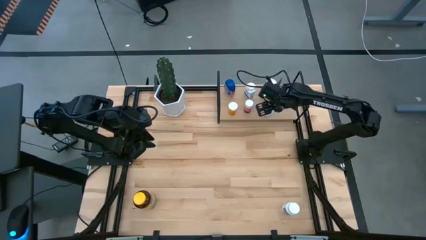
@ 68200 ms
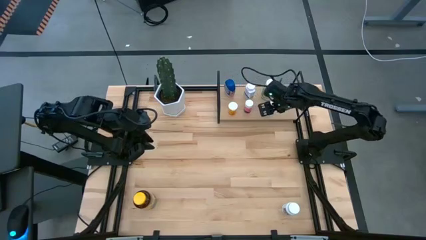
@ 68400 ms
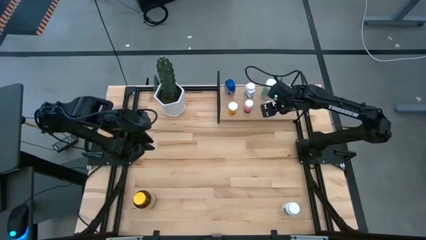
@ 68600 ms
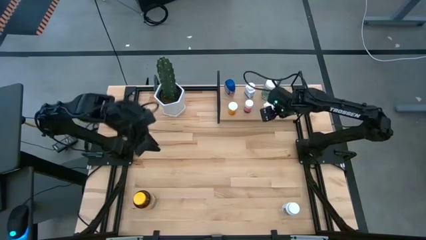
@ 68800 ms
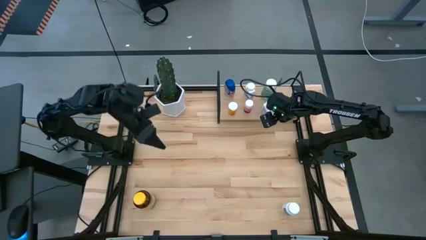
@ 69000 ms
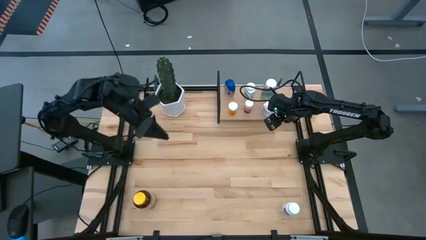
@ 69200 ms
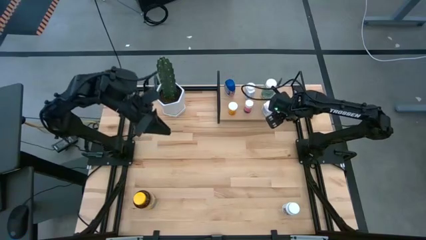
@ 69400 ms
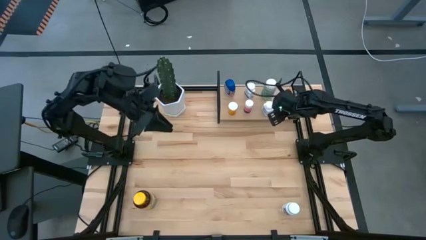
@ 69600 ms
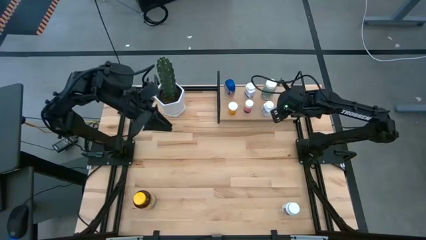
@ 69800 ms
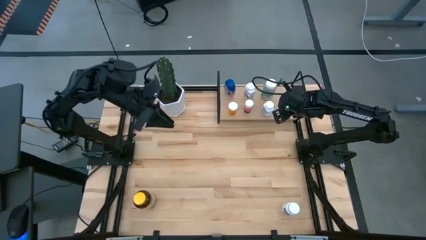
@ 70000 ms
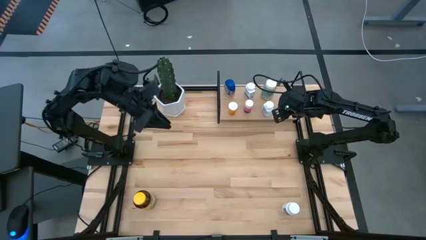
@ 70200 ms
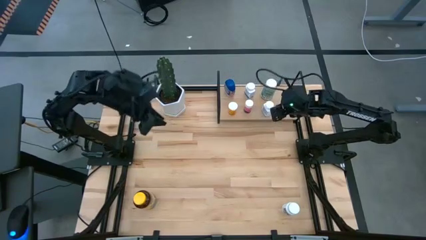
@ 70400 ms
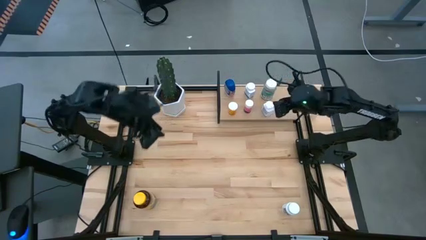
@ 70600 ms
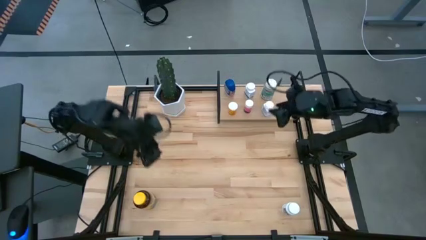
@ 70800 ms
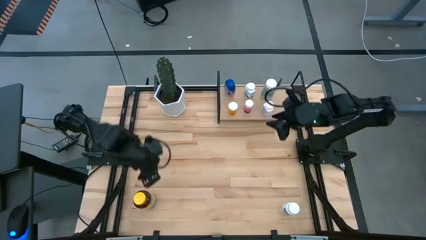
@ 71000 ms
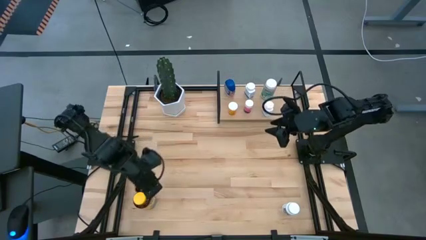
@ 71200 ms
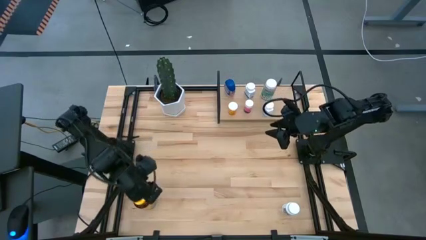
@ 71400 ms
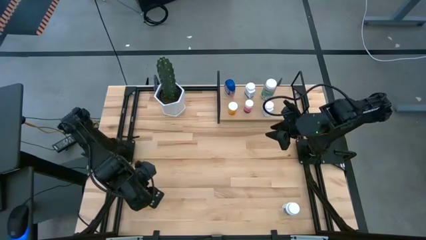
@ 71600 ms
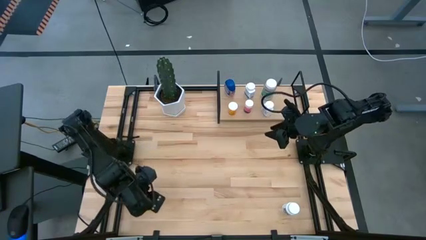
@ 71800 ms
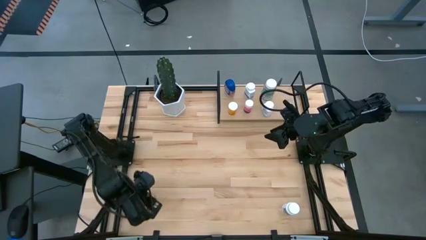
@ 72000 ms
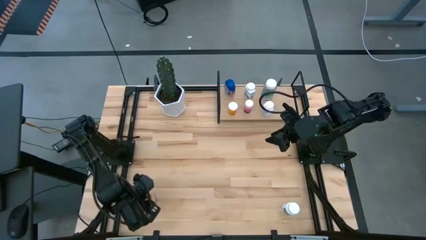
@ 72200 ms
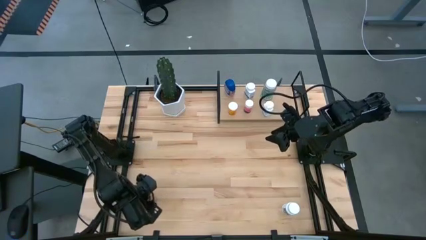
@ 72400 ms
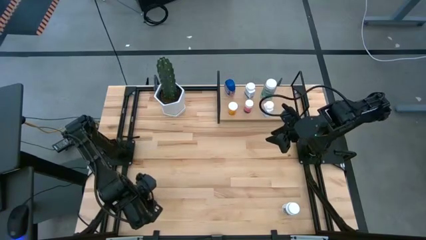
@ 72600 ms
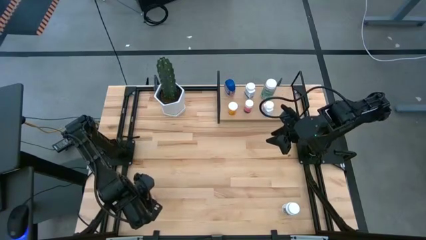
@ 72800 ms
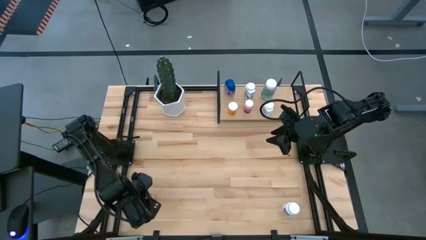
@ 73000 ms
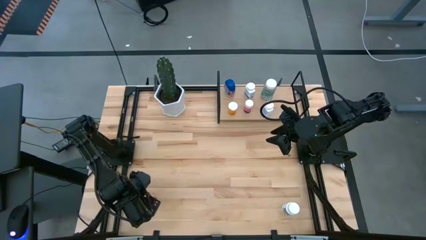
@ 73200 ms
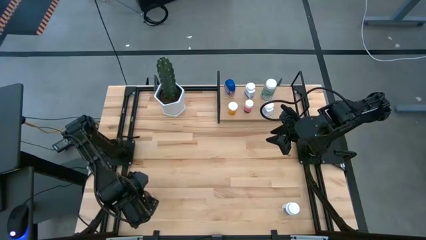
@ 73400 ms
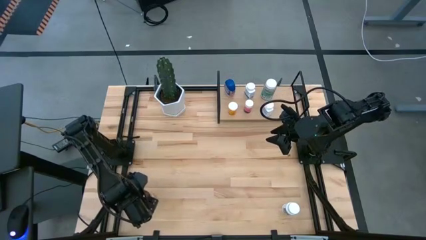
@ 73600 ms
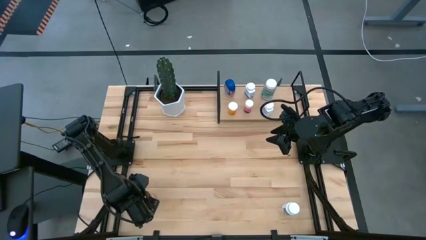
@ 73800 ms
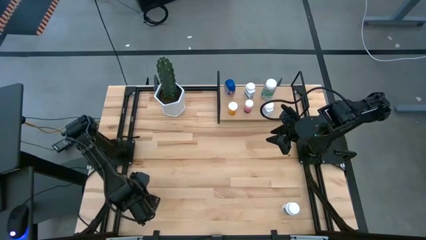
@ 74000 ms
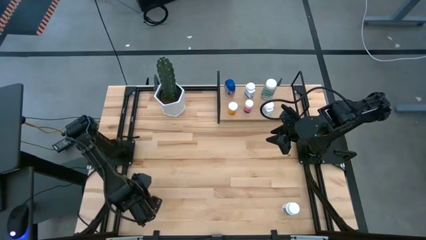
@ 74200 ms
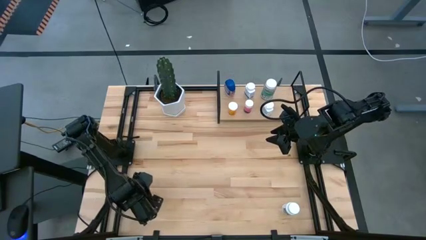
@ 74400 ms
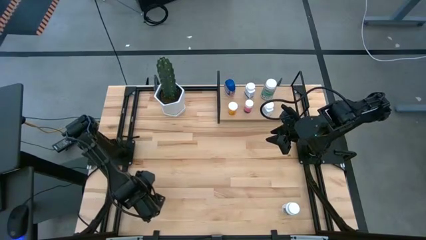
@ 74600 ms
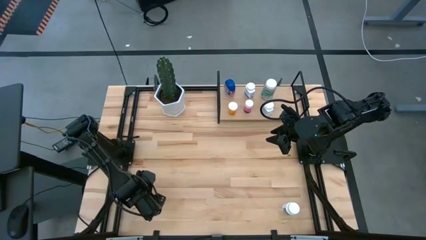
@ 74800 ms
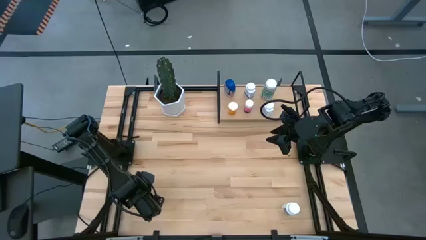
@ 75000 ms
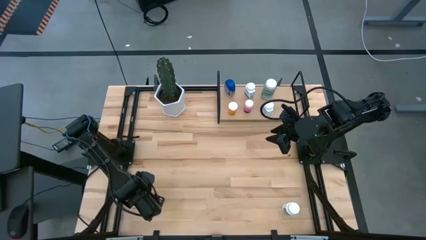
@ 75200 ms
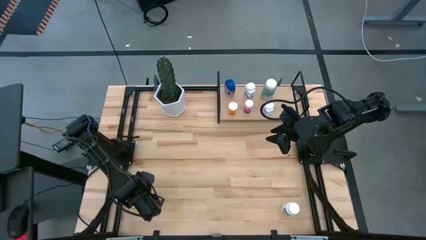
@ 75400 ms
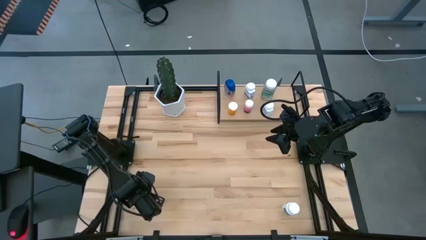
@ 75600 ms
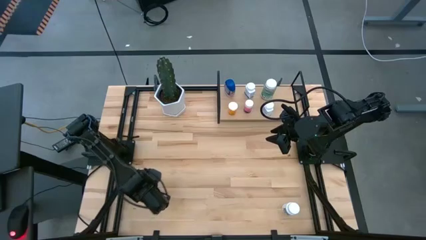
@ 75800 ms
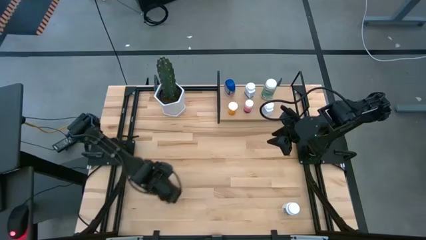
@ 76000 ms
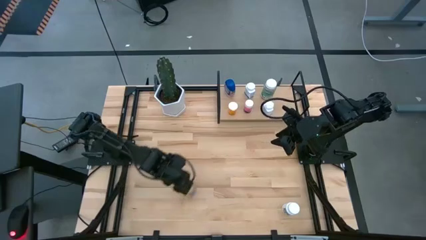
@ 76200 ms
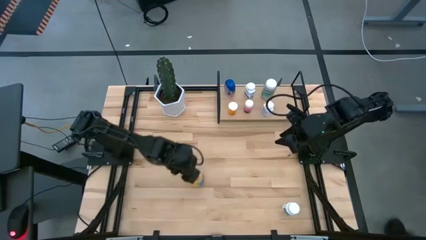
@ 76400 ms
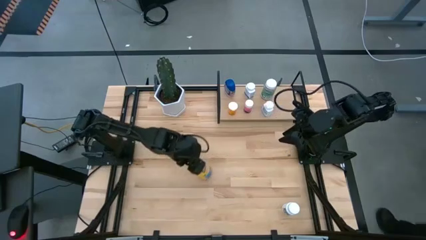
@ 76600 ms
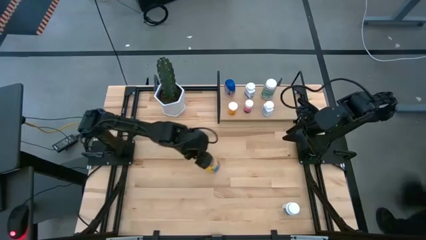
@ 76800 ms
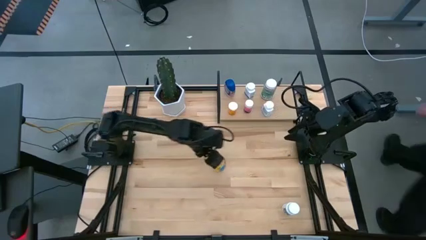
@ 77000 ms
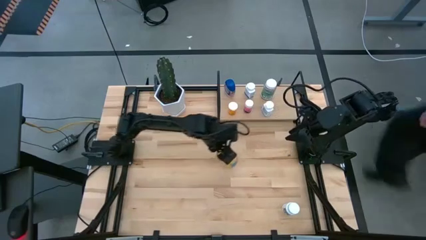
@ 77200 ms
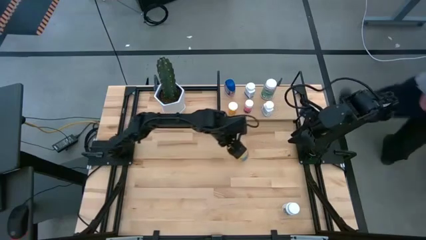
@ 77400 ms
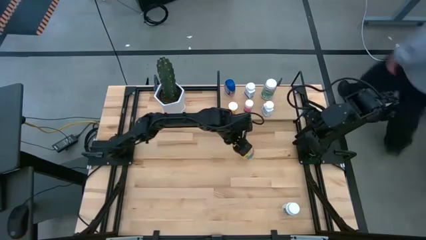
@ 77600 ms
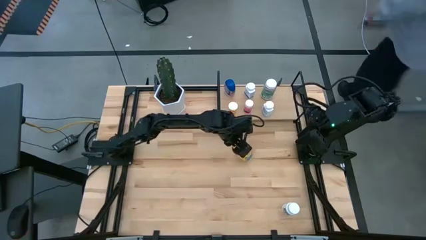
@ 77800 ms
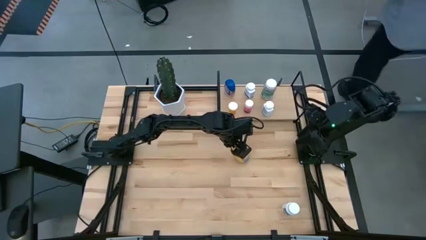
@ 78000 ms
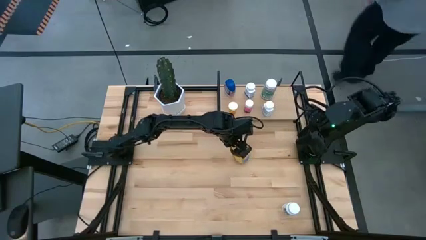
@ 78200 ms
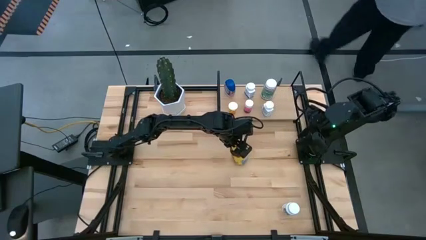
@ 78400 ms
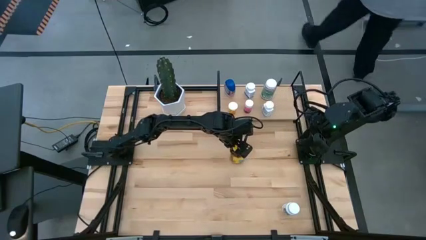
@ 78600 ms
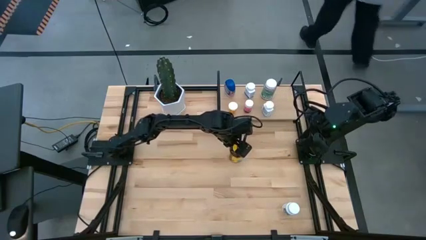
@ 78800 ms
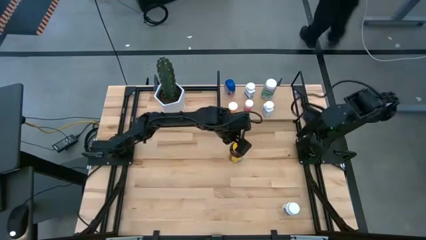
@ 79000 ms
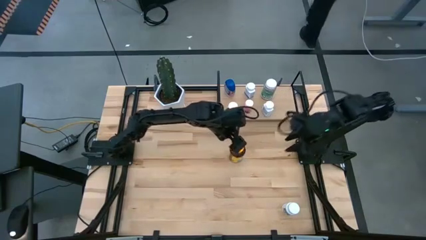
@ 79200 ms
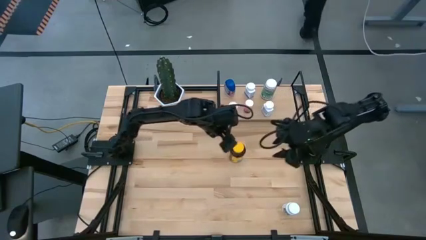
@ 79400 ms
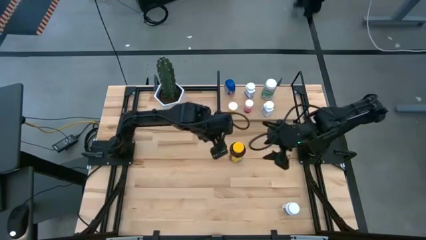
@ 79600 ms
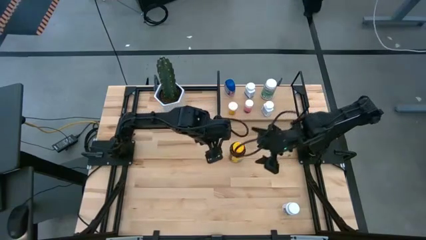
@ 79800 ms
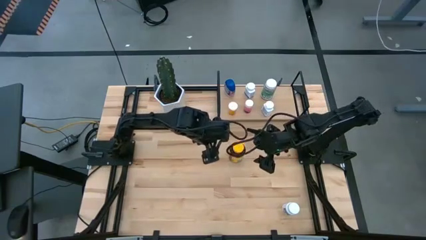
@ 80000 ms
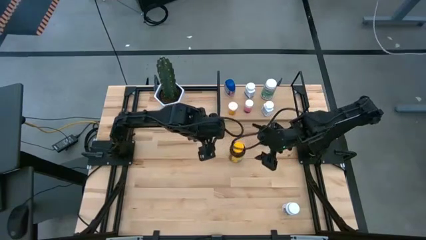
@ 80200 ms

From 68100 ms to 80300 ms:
Task: Pick and place medicine bottles onto shelf by color
Put the yellow pill bottle on the shelf

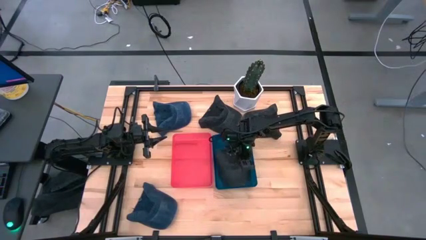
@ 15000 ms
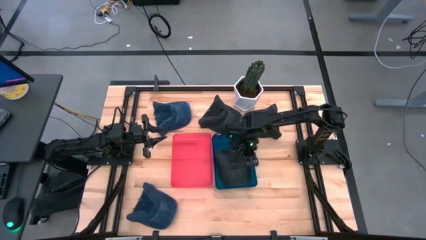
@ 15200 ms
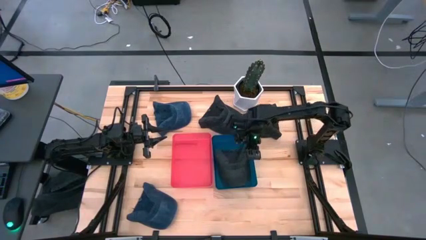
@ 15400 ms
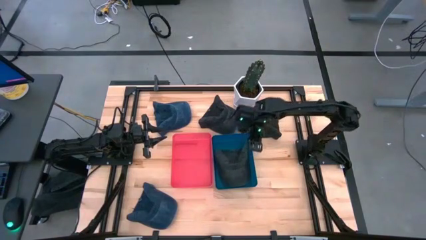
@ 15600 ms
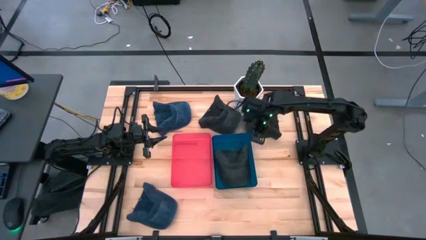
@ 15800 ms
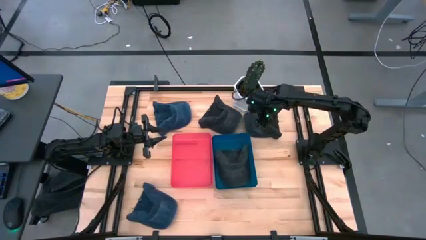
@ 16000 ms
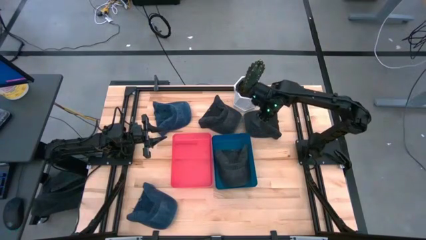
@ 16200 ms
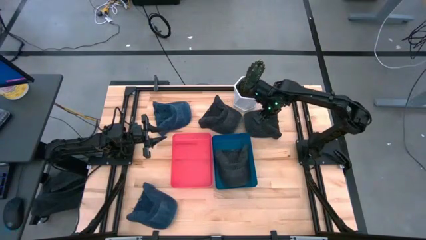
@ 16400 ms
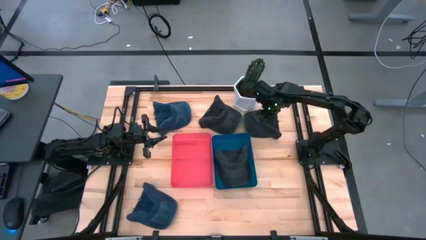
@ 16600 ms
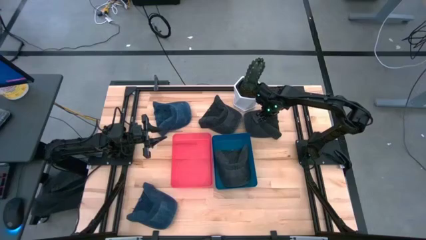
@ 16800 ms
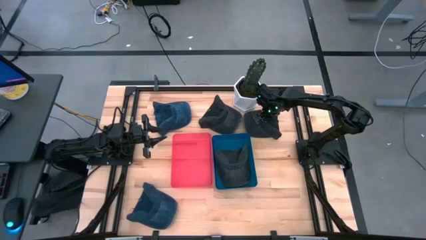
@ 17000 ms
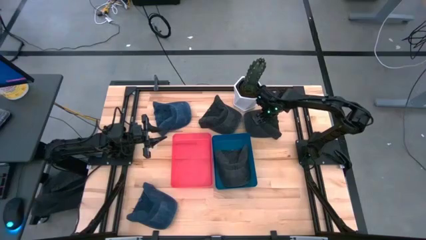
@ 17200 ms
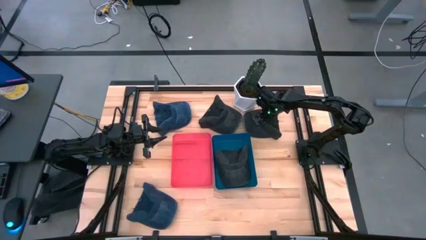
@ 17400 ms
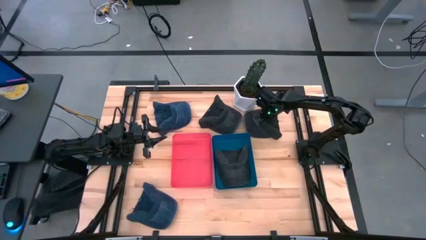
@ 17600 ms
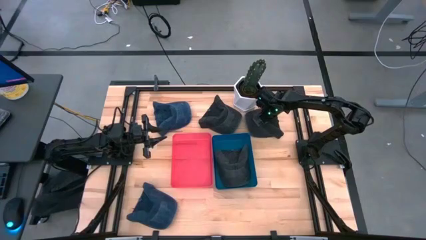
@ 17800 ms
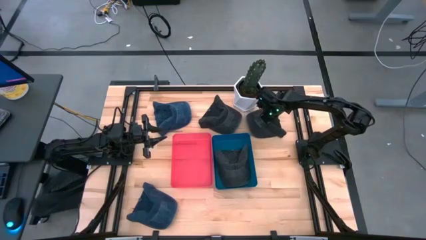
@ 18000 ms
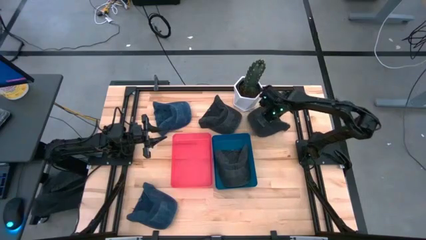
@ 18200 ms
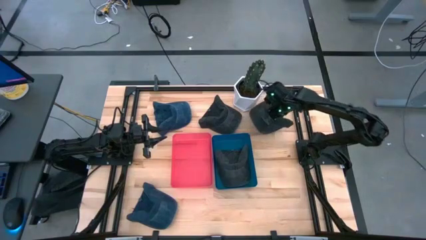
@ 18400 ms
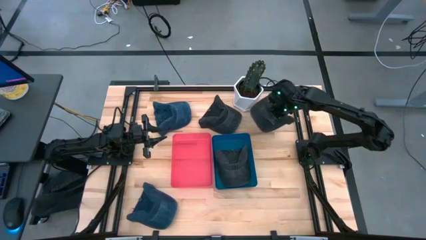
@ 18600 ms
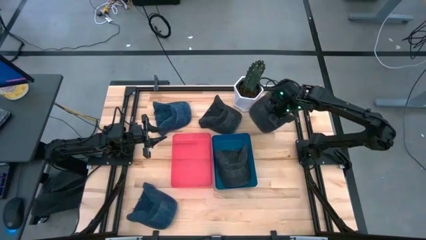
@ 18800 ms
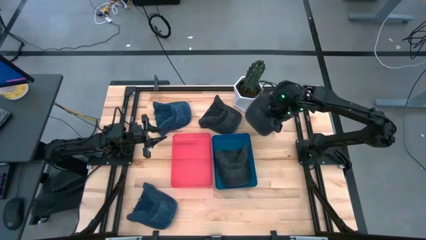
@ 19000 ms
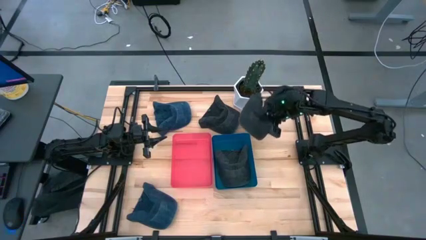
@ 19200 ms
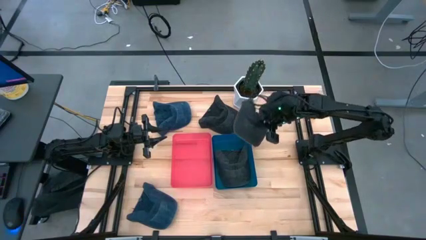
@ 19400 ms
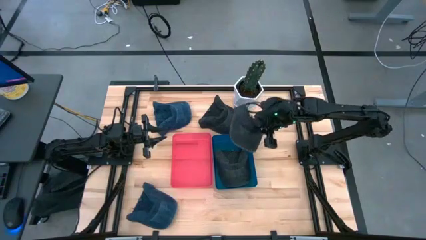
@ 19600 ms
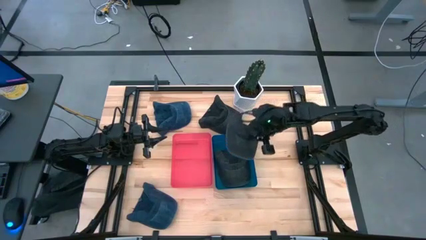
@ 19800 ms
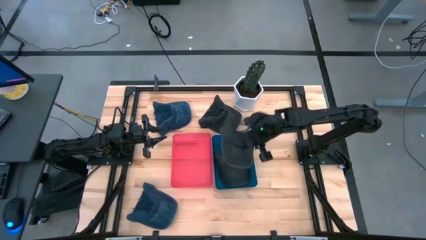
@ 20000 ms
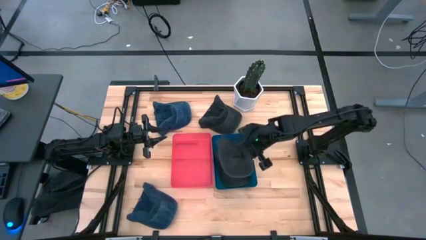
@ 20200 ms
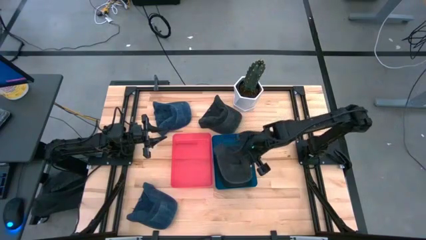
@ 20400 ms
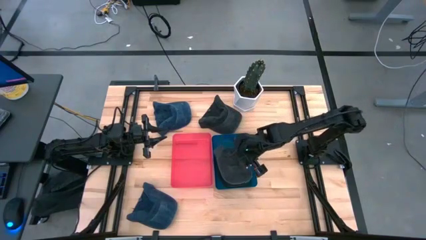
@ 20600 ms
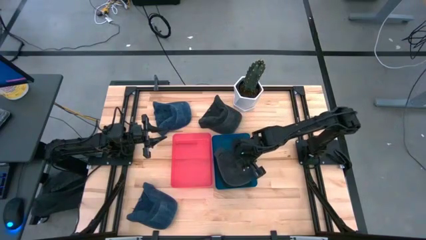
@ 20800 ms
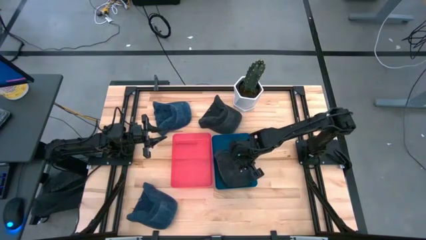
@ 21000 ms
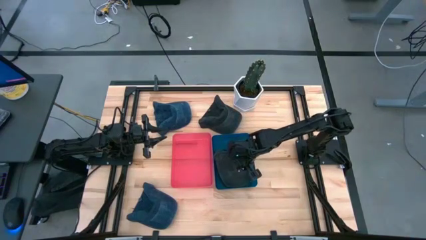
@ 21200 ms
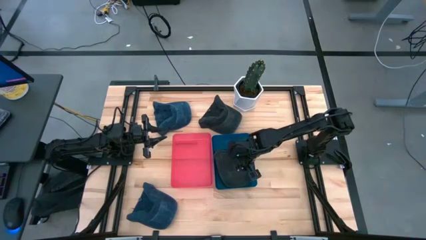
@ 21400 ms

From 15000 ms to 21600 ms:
Task: Pick & Place hat
Put the right black cap into the blue bin
